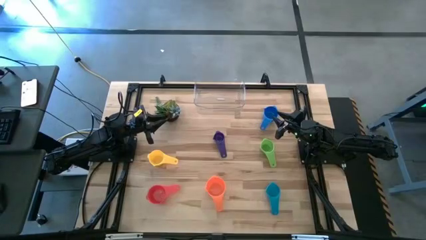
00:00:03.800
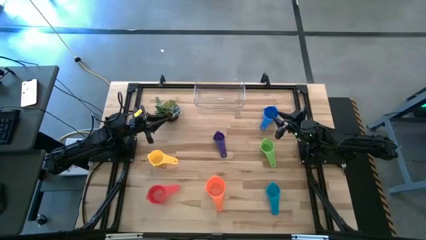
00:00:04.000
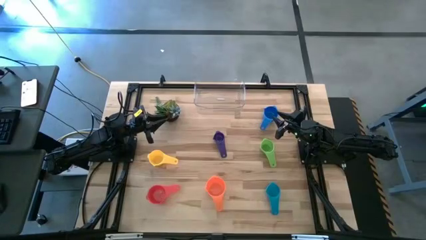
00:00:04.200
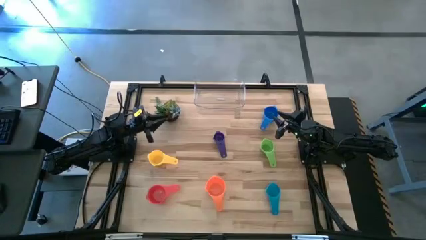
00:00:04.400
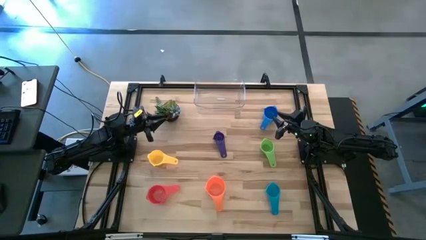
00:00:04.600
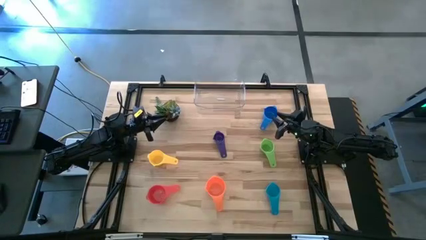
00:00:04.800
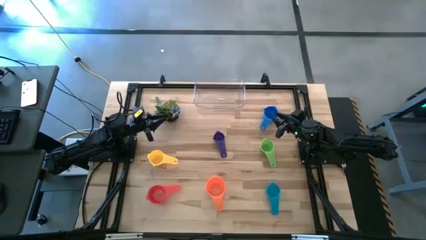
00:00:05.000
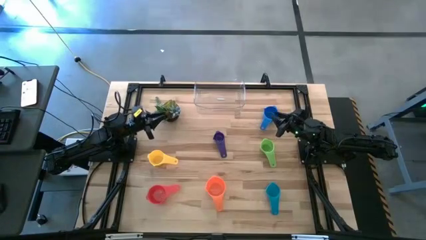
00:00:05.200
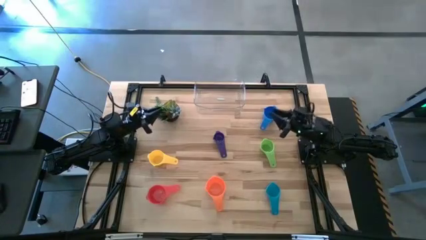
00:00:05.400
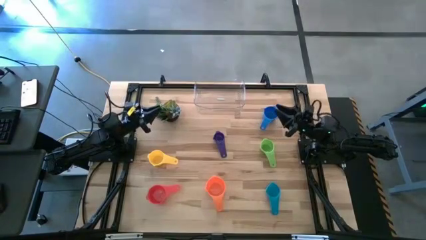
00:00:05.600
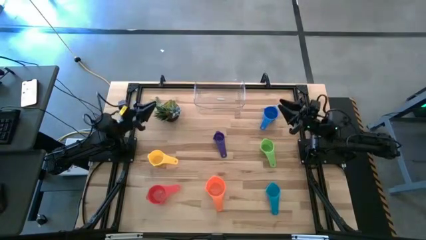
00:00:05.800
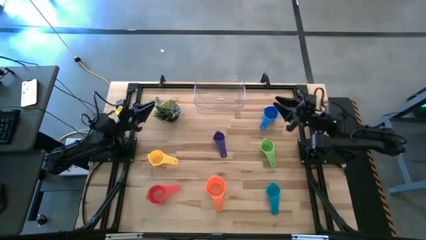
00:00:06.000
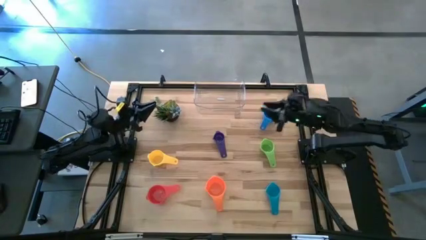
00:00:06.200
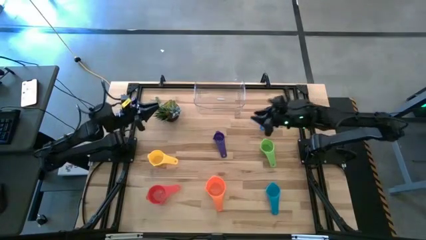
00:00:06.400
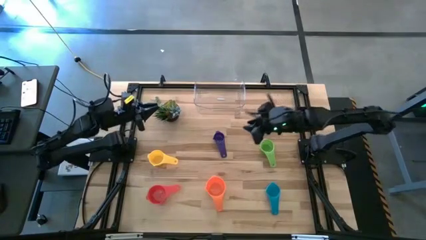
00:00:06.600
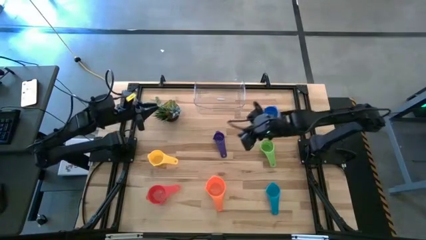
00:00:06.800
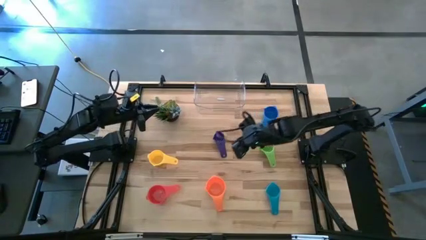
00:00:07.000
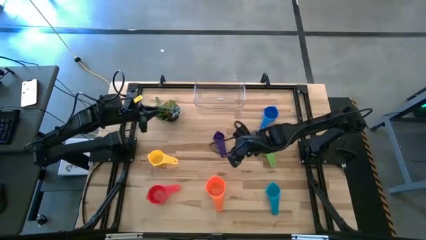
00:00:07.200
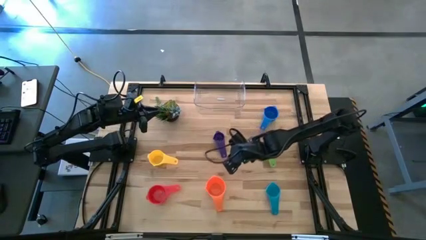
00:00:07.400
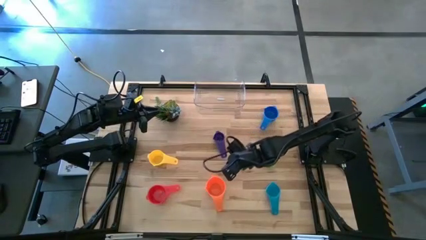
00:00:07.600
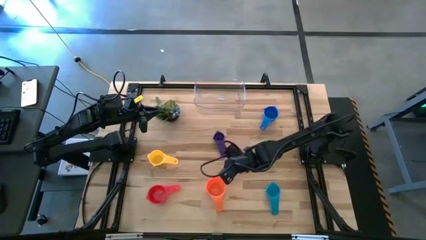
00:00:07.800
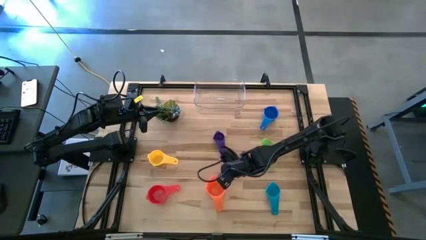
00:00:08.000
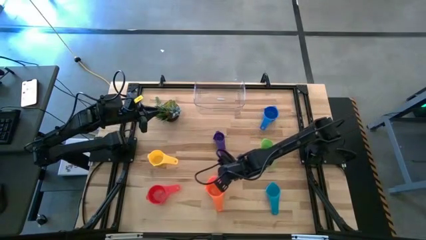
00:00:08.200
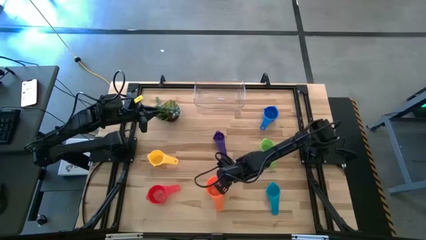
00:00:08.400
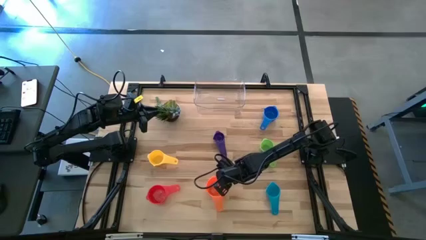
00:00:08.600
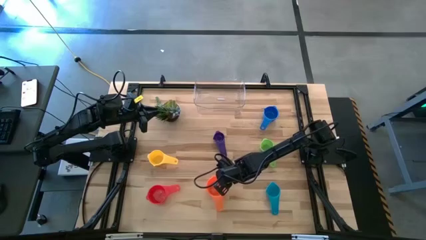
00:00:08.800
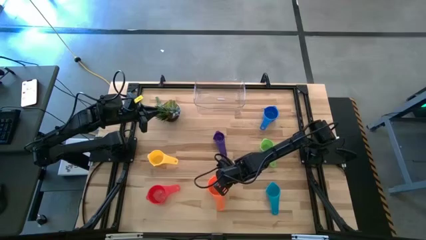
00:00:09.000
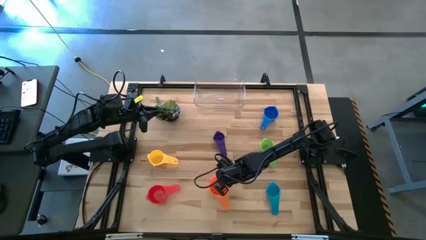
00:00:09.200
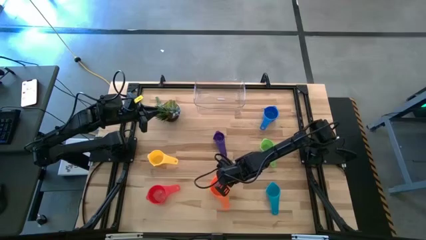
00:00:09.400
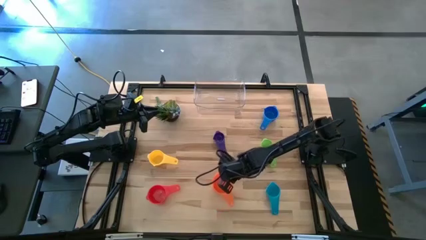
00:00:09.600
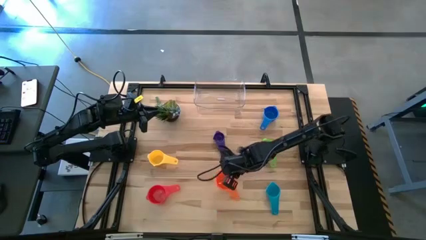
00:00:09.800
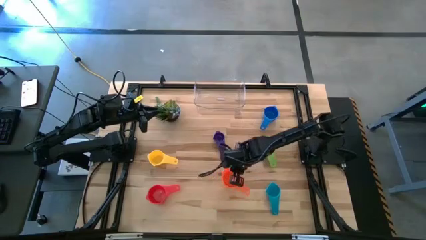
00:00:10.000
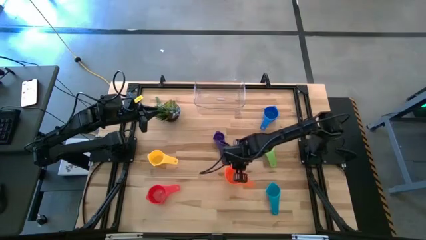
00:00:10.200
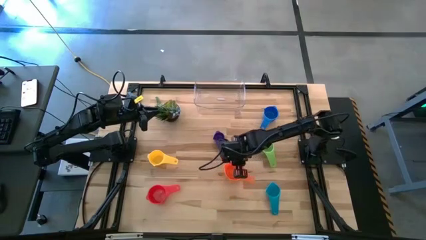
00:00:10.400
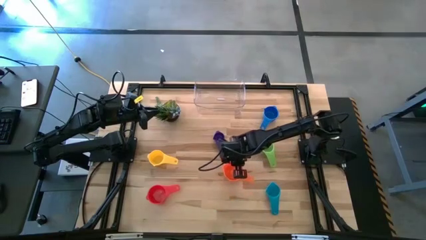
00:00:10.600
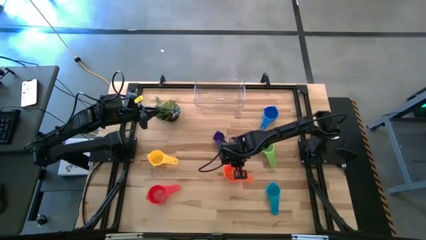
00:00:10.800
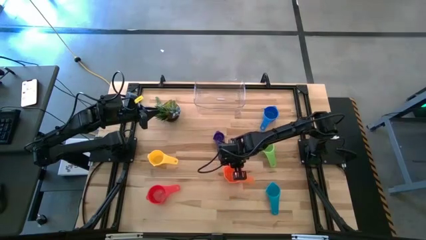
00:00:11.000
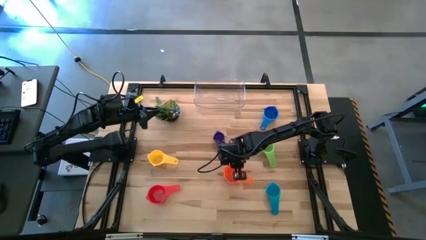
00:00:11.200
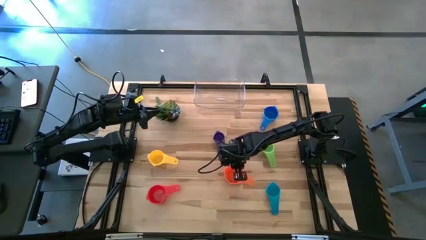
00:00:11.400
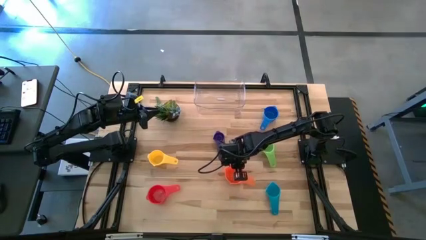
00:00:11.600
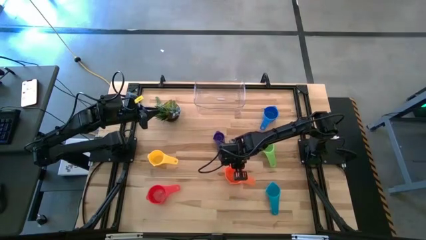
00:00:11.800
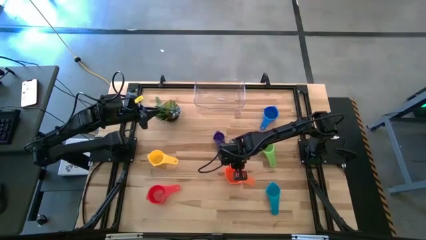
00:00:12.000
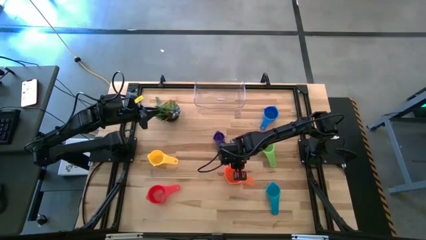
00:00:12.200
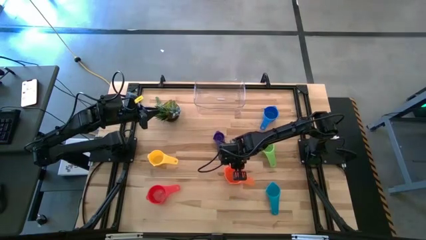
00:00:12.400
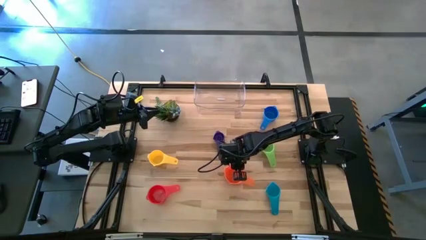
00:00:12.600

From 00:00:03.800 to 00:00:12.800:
Task: Nest measuring cups in basket
Adjust the orange measuring cup

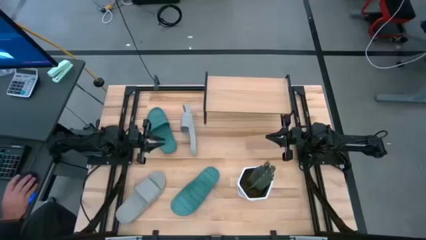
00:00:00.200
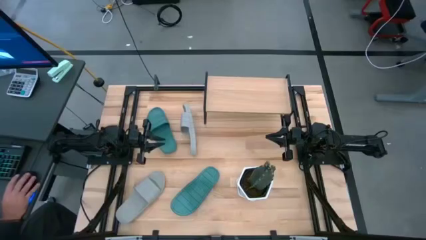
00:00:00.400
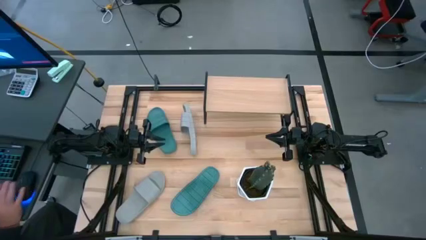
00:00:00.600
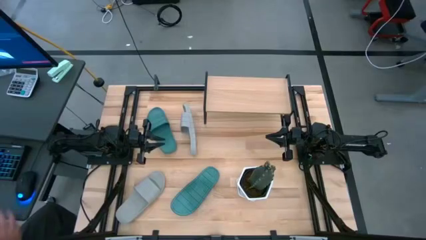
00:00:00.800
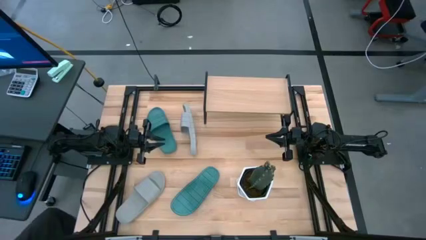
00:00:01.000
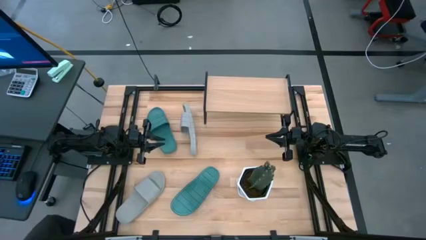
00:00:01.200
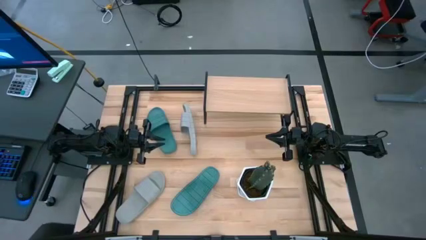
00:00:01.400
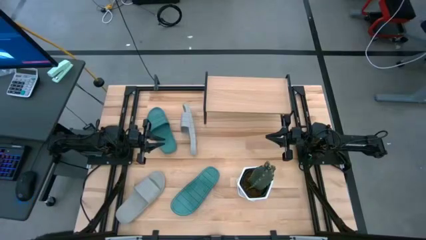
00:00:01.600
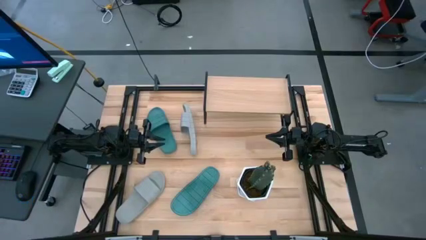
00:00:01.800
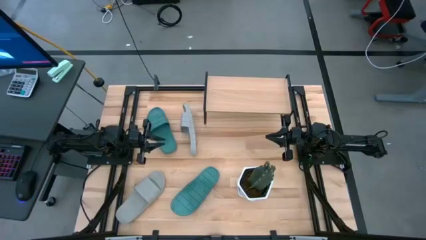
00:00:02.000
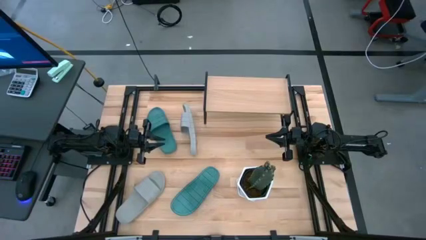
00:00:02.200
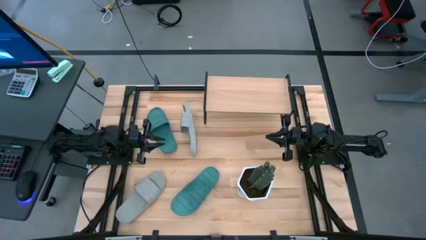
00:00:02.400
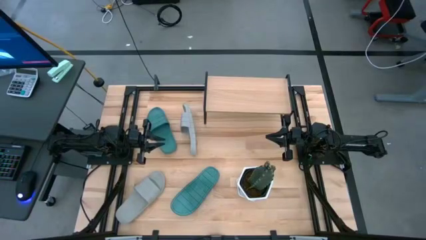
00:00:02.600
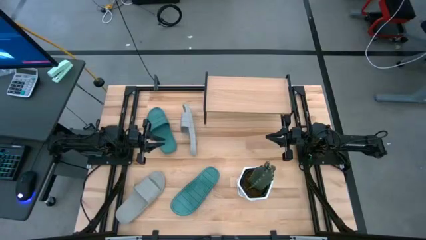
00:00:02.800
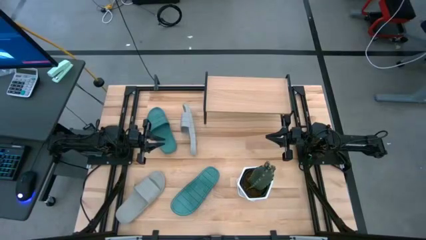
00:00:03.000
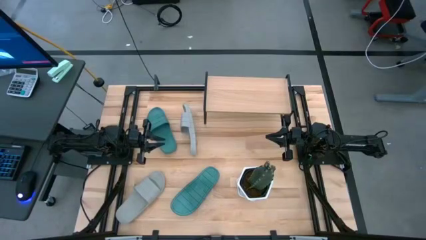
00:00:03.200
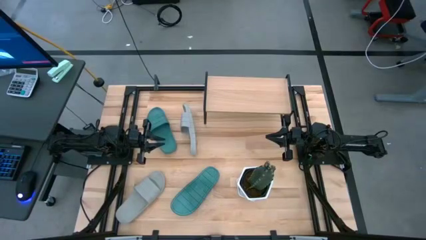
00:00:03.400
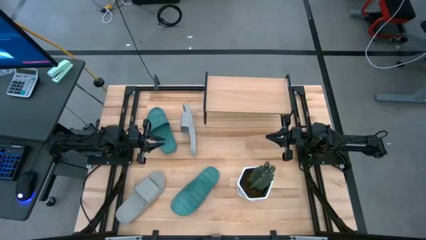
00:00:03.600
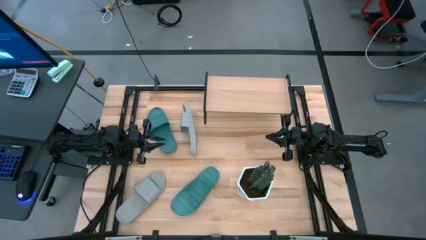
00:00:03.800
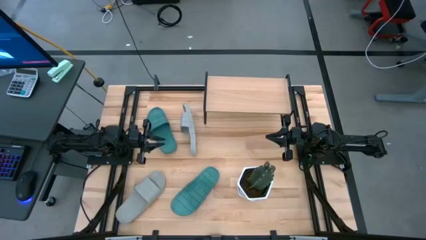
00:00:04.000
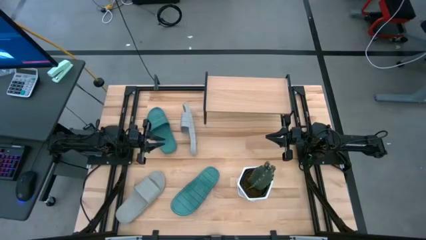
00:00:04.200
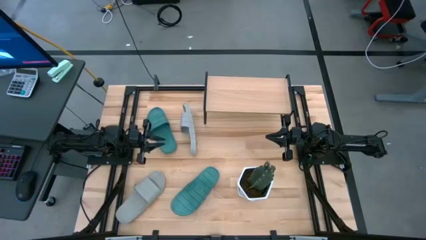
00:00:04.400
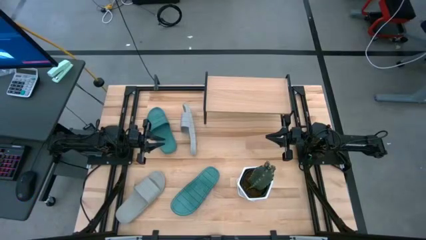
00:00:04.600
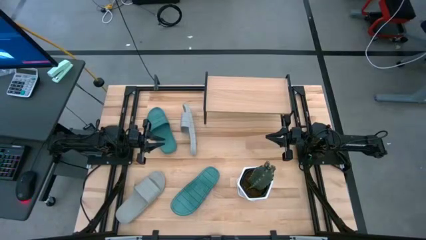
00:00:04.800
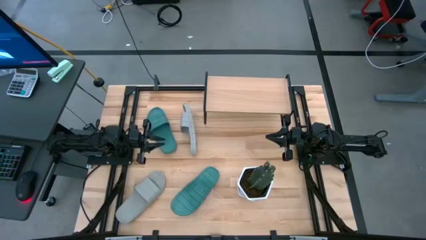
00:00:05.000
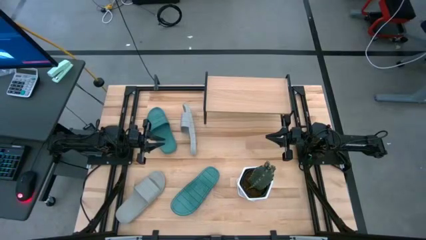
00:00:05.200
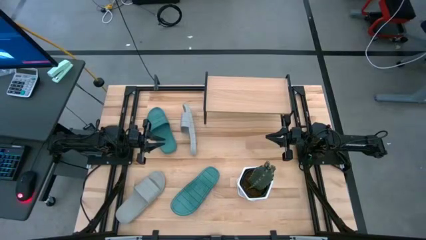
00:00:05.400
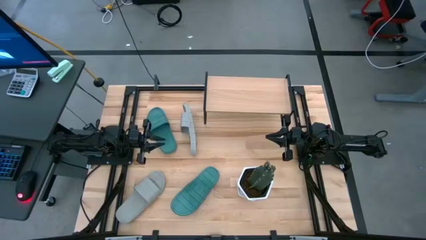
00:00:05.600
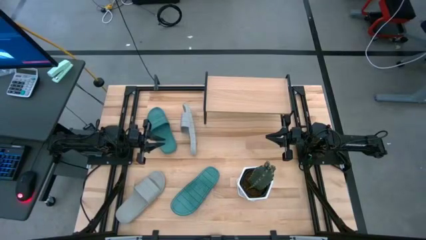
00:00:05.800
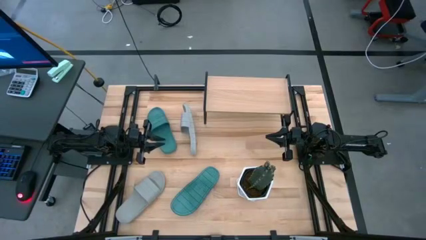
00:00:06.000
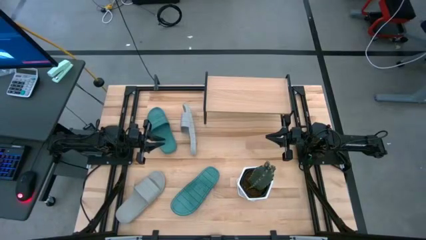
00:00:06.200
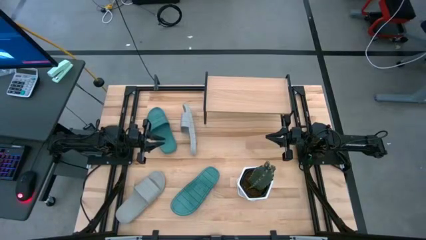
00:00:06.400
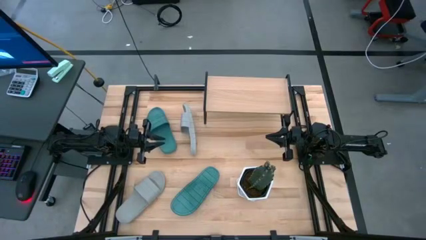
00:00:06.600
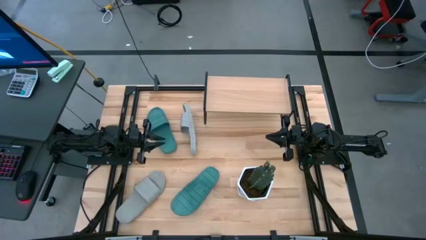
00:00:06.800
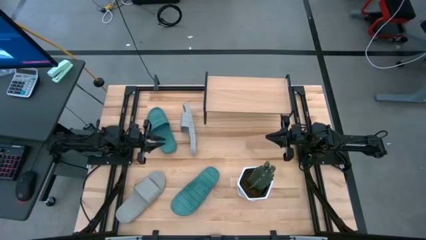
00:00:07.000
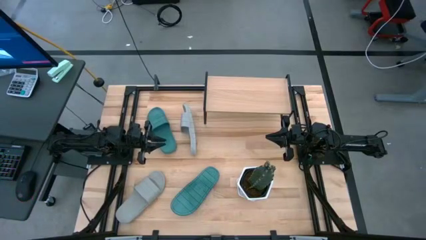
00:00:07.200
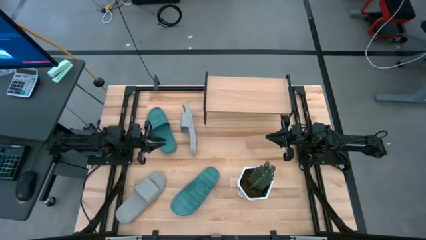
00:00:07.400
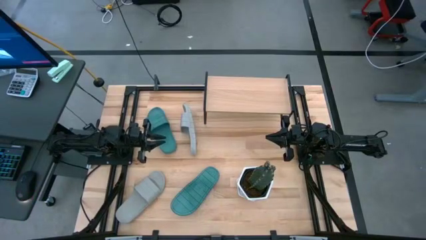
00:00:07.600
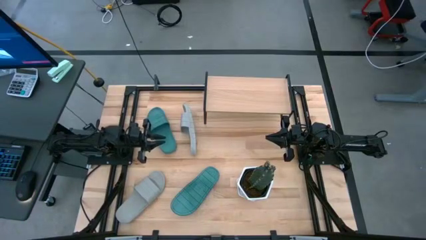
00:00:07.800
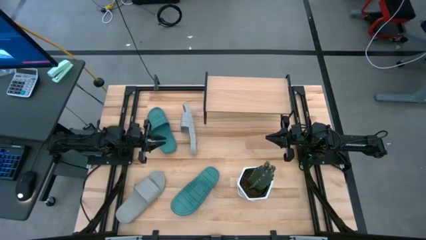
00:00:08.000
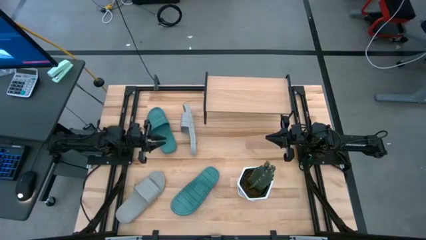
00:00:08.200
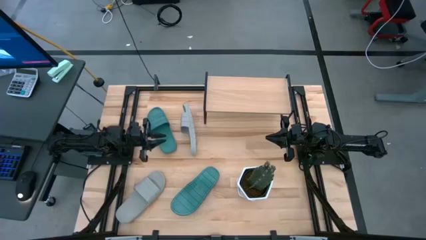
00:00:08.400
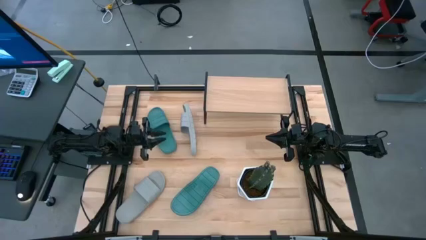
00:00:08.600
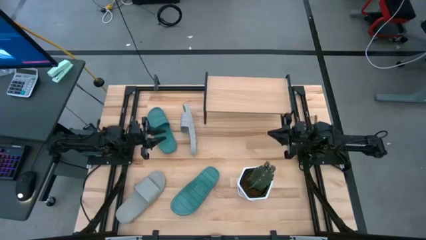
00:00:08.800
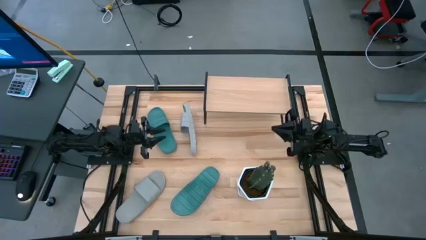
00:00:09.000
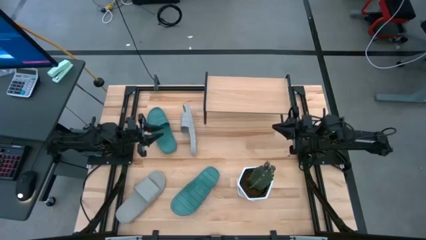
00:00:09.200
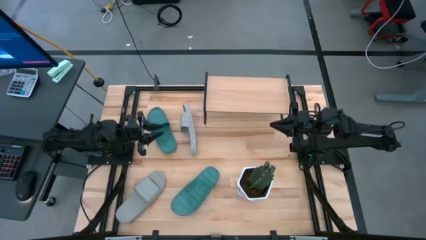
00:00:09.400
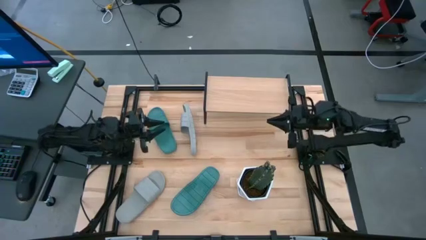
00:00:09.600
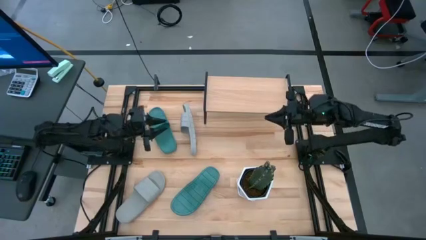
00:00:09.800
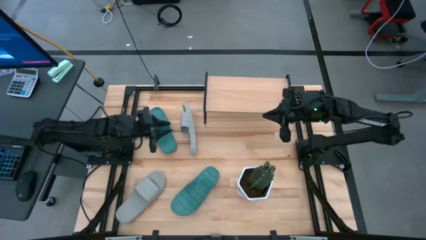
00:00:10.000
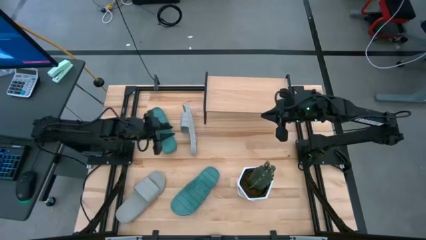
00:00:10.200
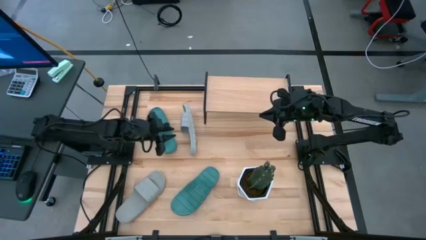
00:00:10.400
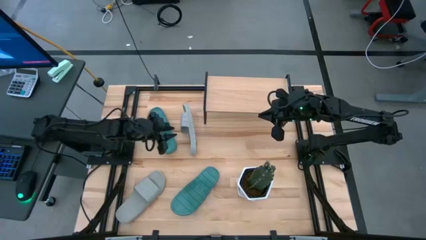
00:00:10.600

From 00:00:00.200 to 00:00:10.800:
Task: Pick and place slides into the shelf
Put the top green slides on the shelf
